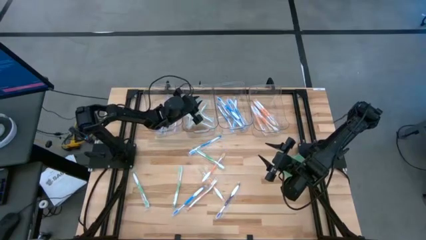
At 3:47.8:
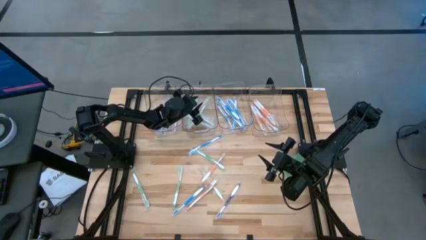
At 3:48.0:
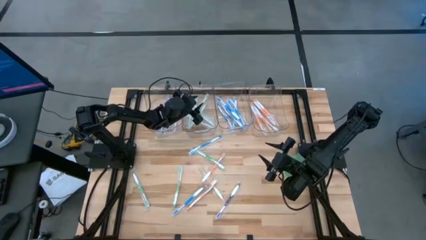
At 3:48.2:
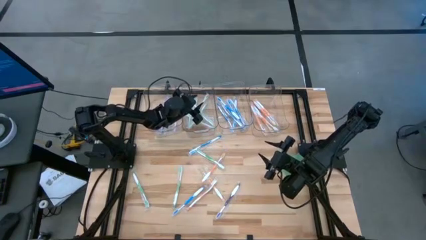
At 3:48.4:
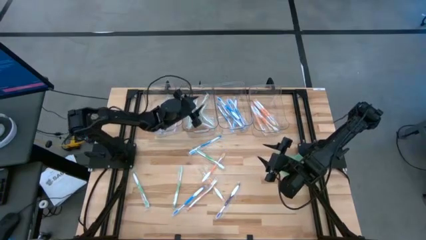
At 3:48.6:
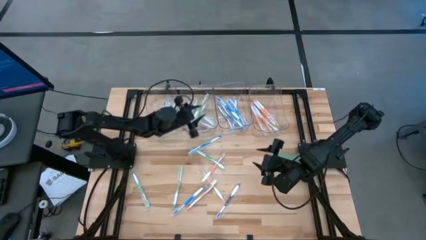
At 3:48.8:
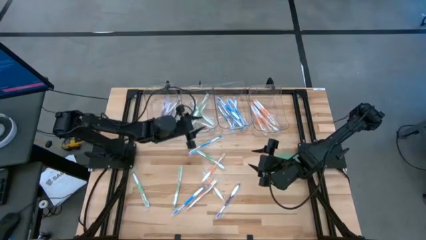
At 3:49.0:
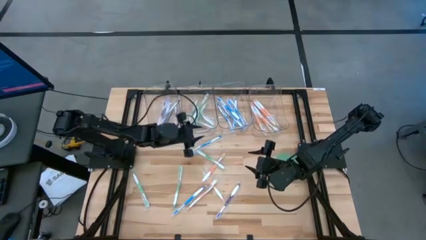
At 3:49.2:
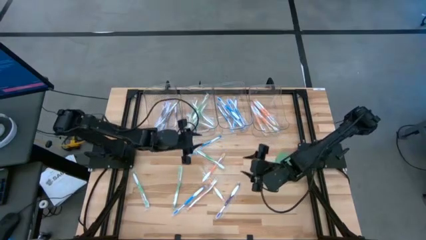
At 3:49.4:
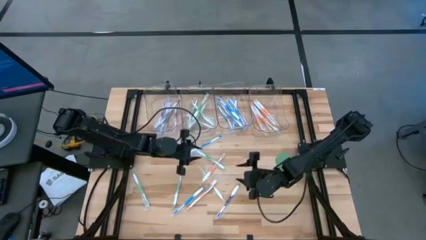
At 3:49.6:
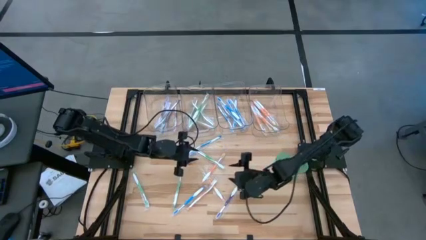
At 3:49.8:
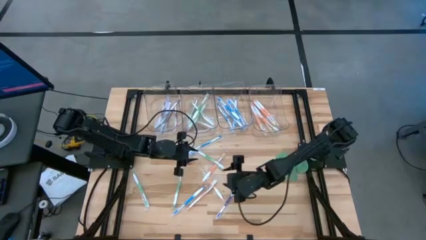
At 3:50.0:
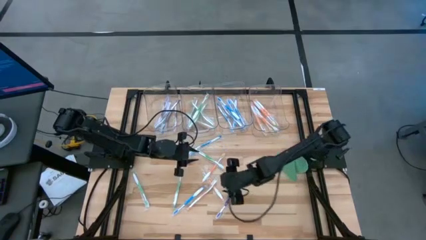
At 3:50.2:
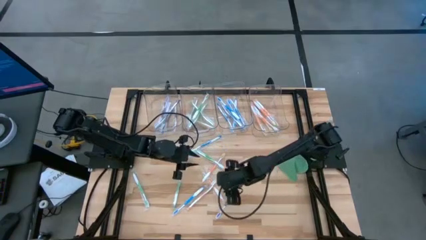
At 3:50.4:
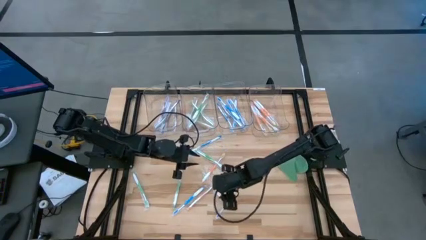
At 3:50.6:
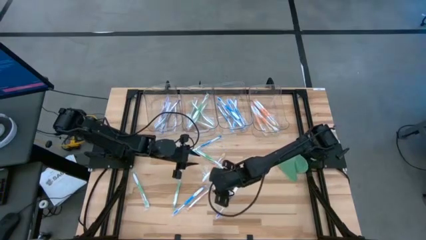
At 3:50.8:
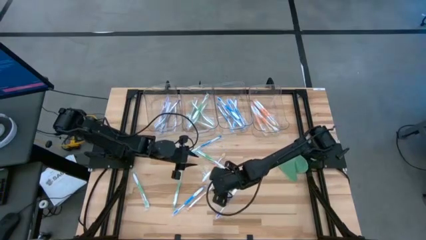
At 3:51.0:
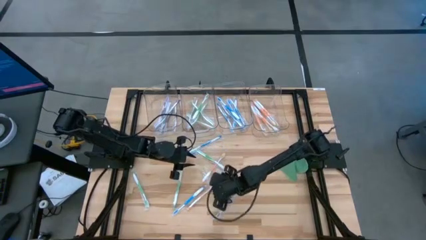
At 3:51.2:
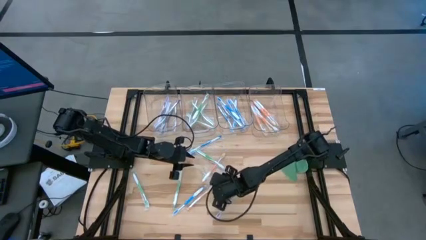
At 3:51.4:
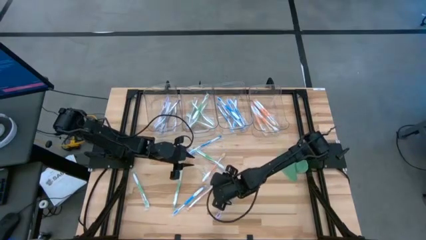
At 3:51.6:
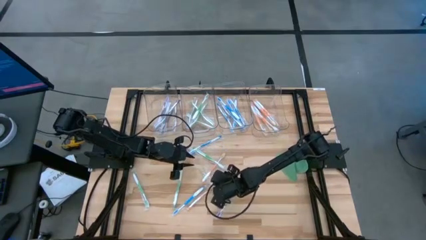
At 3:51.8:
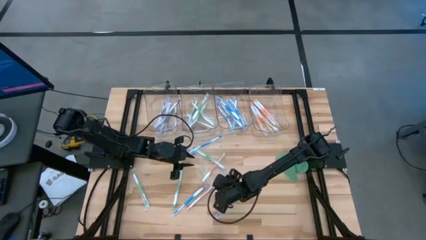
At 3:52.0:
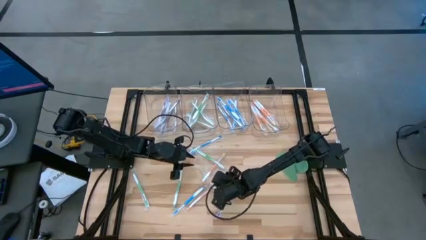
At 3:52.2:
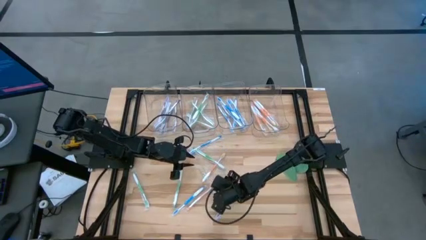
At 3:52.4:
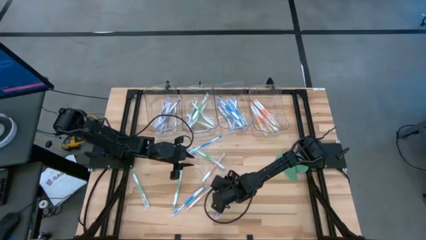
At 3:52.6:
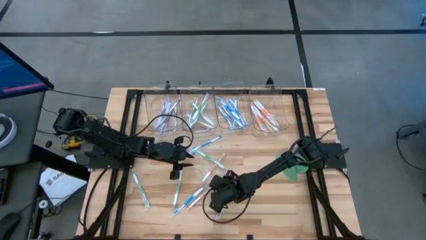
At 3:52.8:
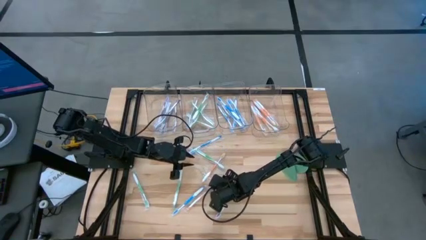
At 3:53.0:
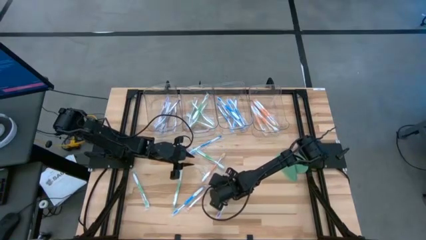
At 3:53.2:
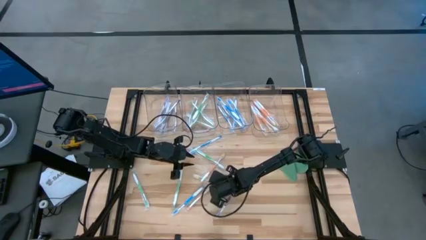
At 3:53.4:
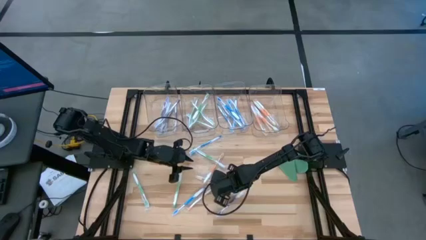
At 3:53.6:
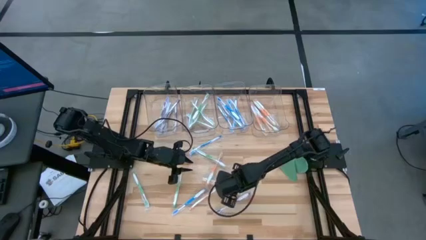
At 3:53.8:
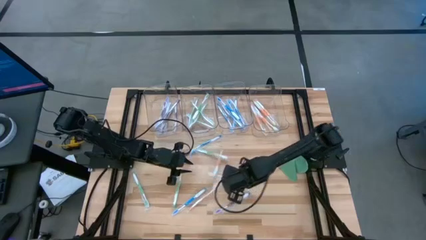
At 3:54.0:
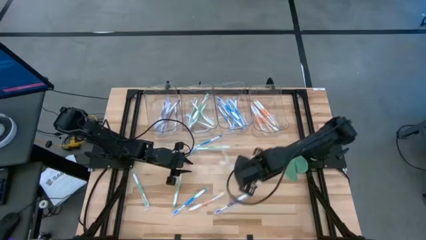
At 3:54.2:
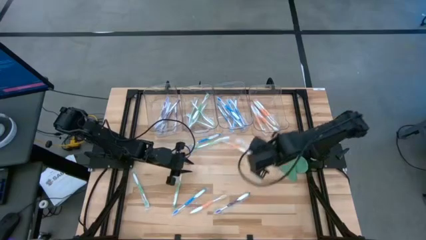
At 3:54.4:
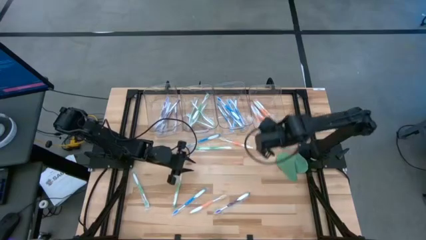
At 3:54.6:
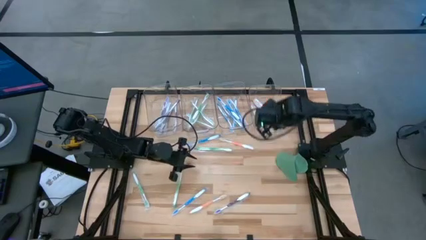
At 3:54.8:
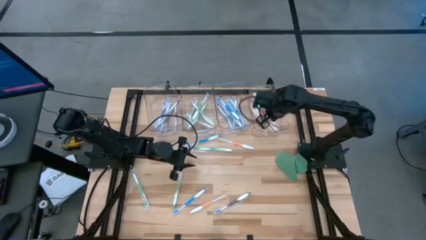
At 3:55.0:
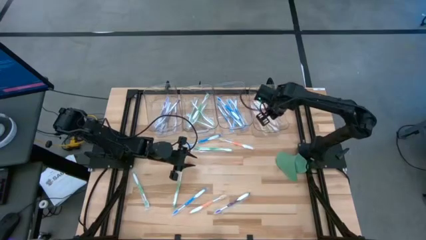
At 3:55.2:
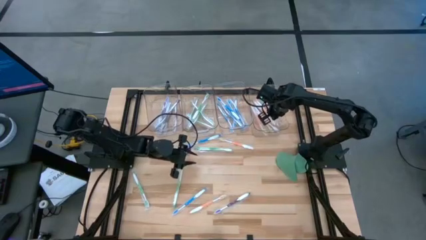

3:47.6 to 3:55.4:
Task: Pick & Place Toothbrushes
Put the orange toothbrush into the right transparent bin

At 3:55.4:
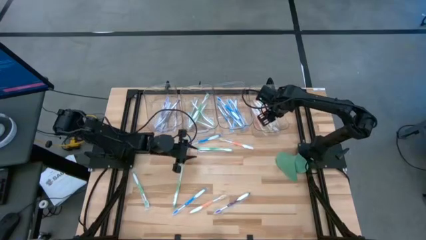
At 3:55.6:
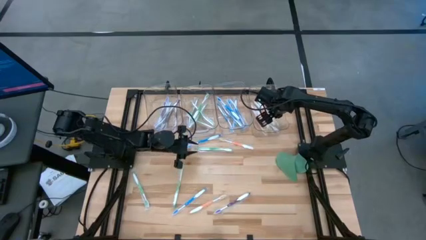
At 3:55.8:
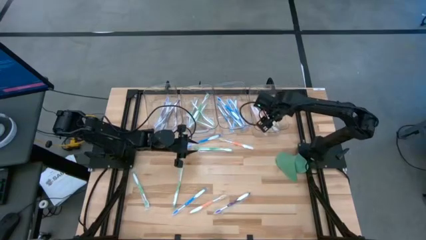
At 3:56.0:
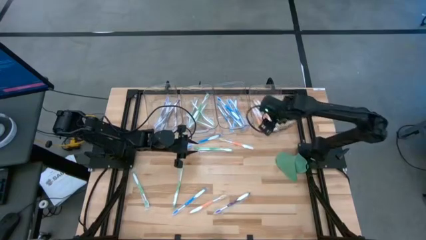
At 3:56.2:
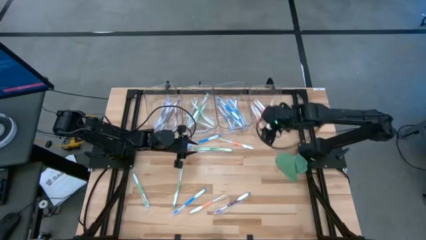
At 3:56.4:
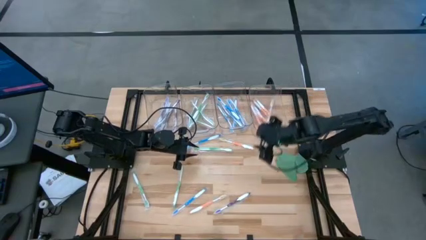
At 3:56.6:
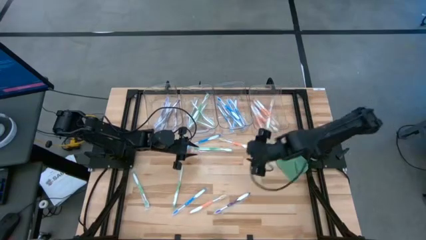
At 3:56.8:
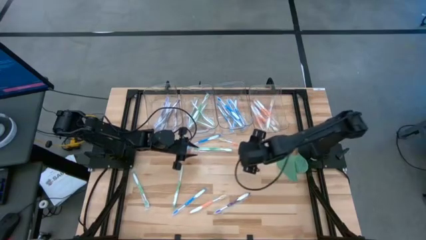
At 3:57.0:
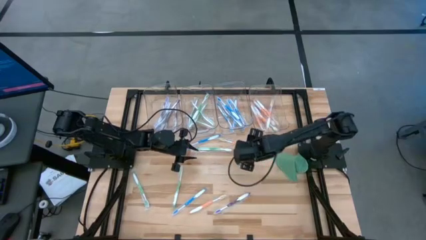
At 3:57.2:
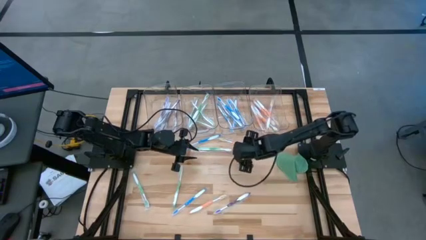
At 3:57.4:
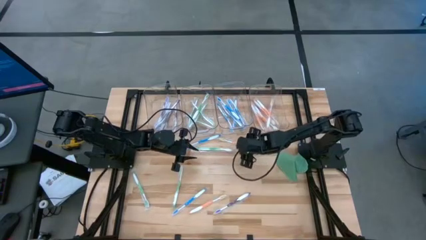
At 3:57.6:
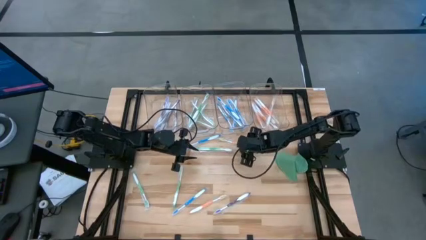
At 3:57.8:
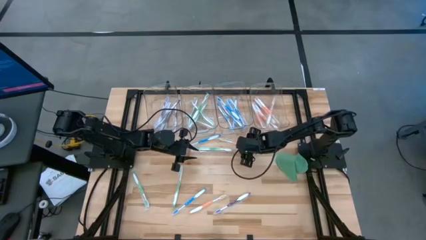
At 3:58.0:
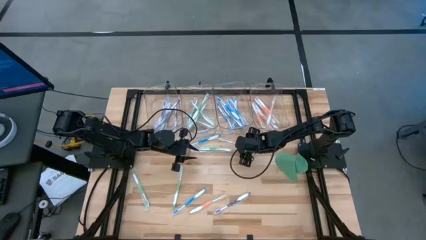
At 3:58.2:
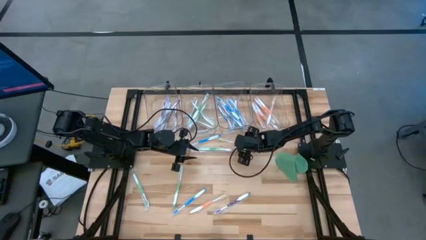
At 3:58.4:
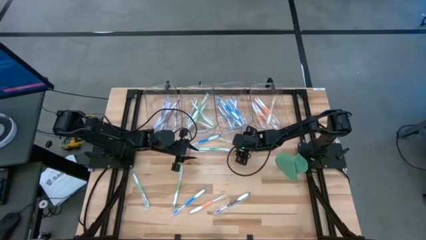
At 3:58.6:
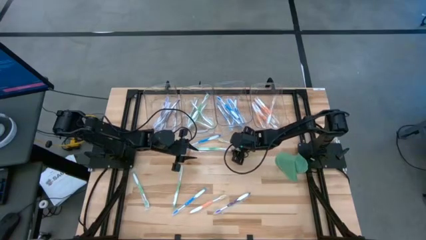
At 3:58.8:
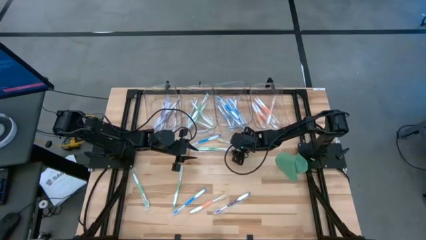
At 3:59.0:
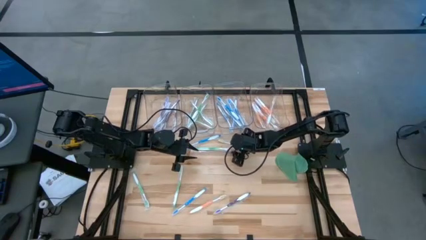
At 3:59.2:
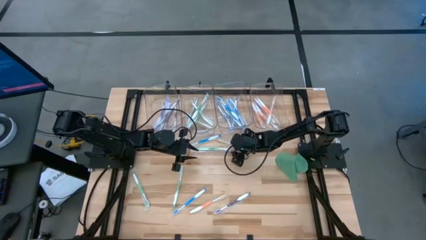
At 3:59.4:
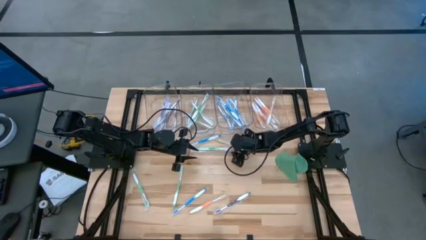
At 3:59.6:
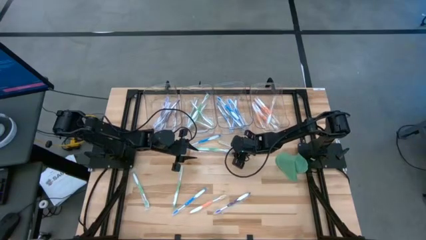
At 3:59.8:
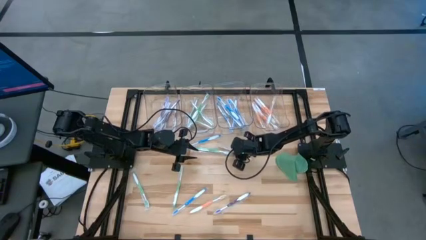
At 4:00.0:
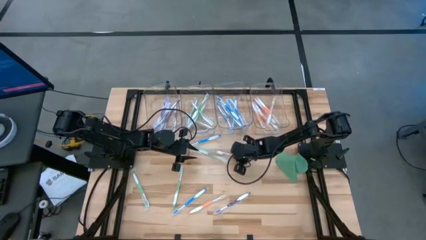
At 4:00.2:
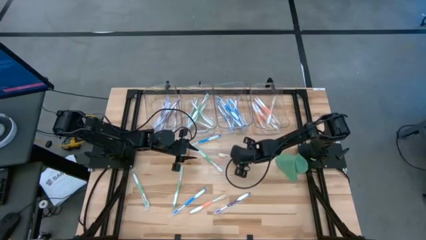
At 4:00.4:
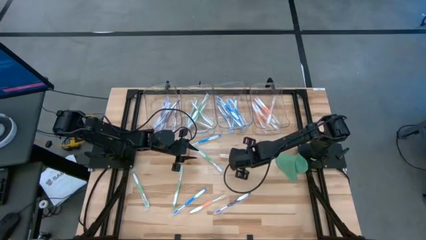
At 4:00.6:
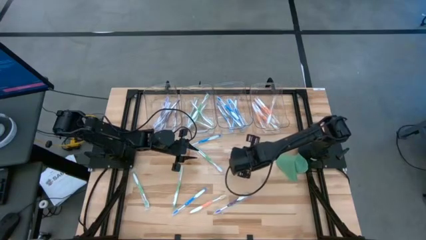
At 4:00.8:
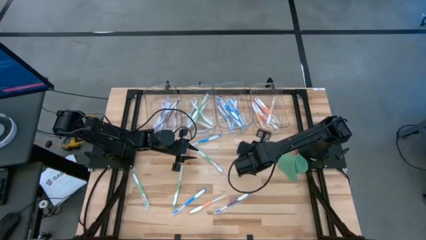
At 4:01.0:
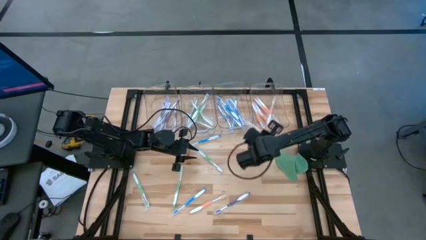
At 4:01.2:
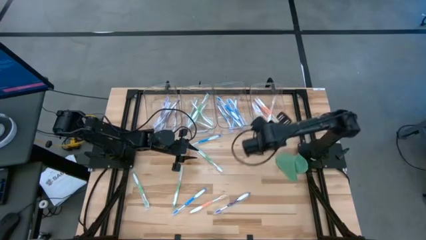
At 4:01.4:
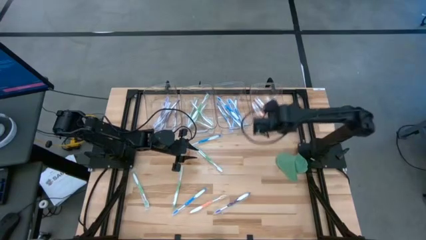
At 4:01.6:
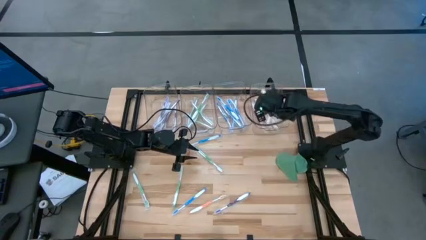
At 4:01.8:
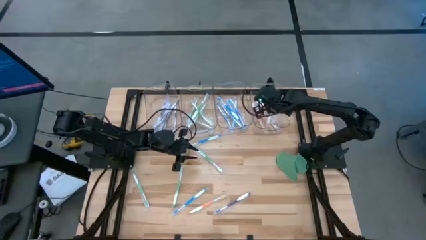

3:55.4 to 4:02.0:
Put the orange toothbrush into the right transparent bin

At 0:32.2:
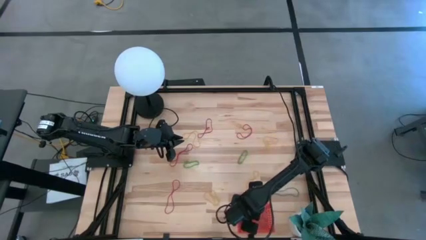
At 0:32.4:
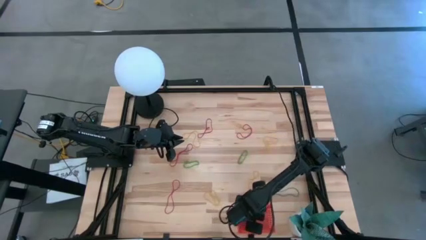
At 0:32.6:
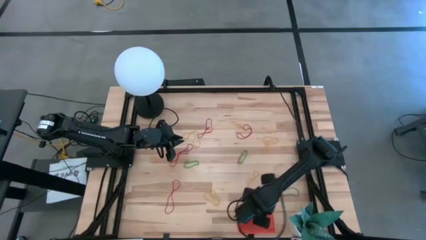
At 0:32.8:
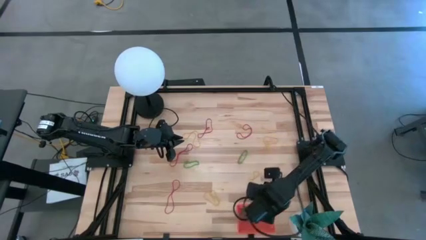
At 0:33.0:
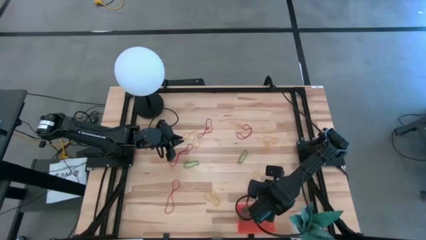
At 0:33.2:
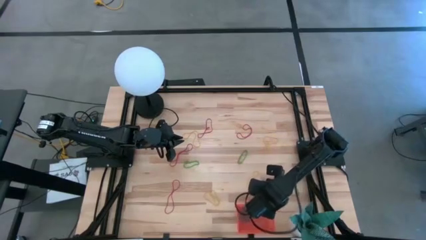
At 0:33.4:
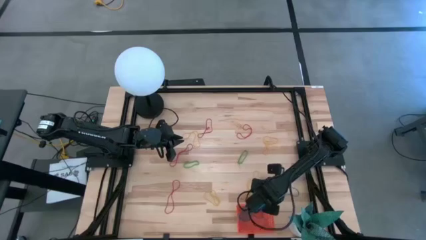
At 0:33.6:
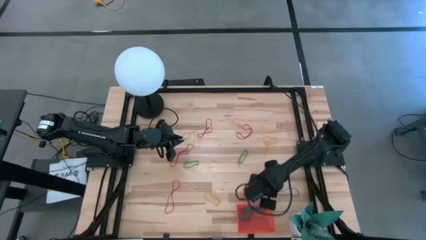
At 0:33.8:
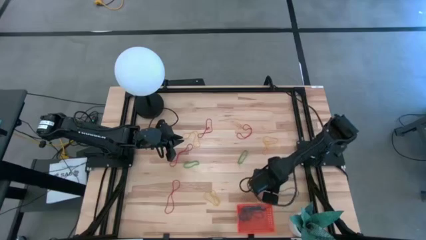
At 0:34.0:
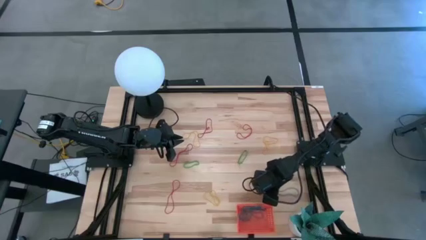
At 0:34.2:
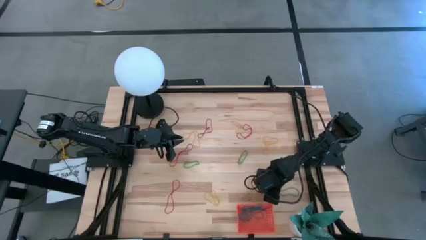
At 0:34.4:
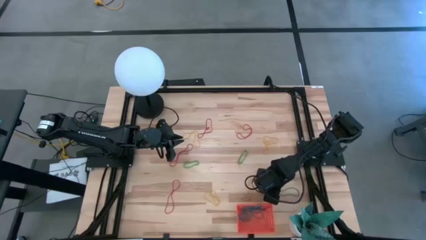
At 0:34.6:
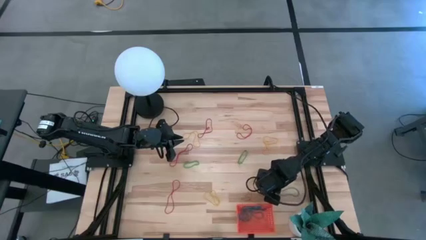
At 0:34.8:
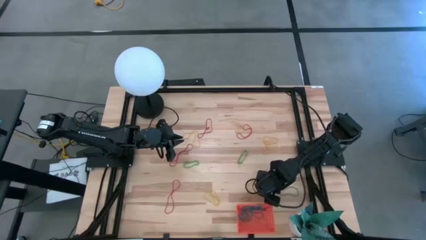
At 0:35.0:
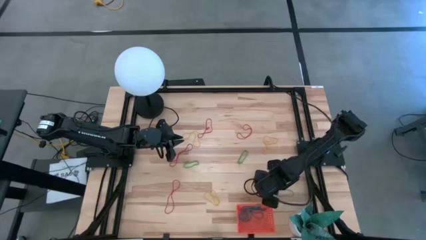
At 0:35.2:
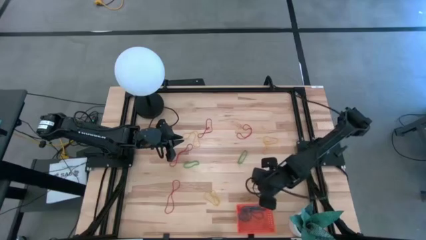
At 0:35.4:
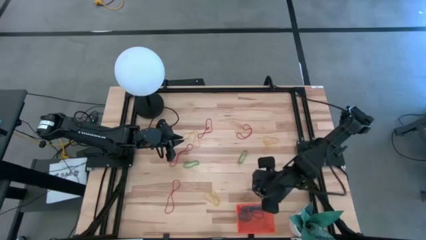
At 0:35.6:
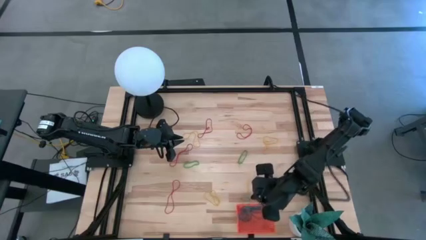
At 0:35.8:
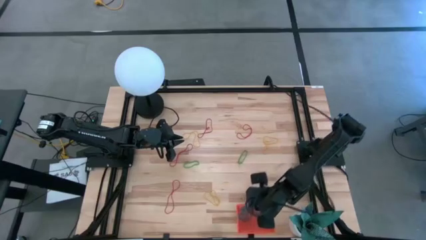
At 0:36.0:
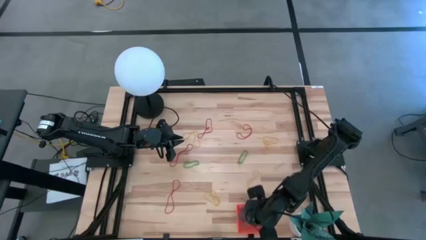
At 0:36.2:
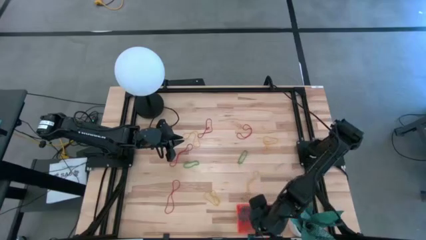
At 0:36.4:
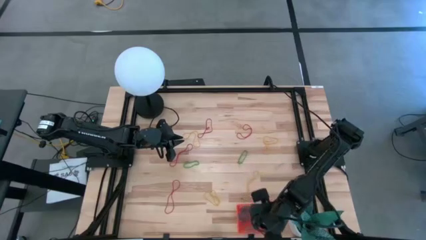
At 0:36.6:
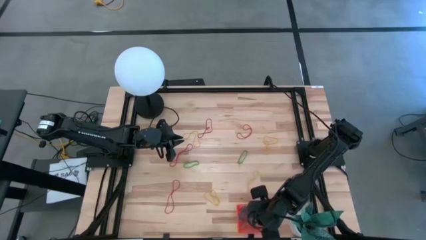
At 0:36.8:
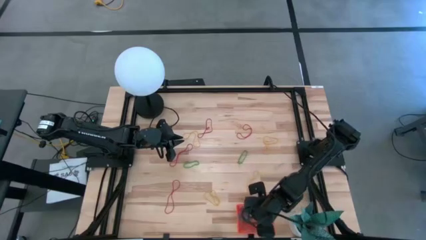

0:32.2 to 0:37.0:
Task: Pick and place items into bin
Put the blue rubber band into the orange bin
